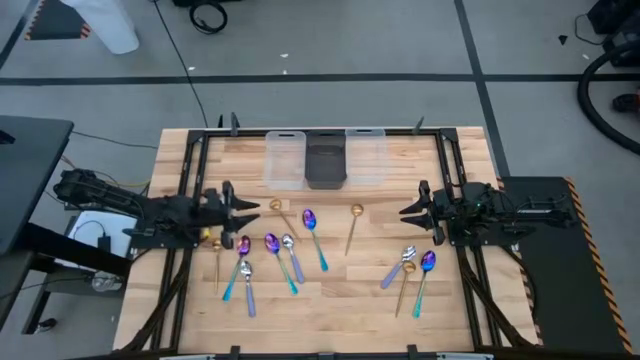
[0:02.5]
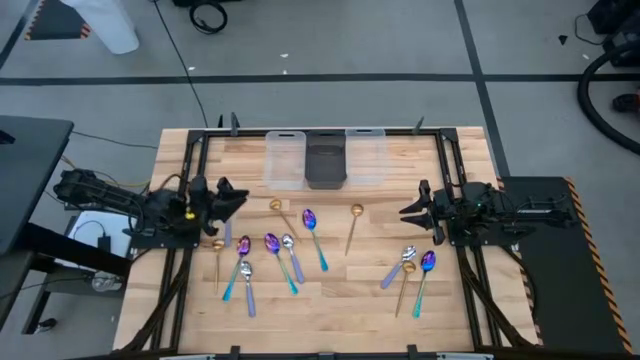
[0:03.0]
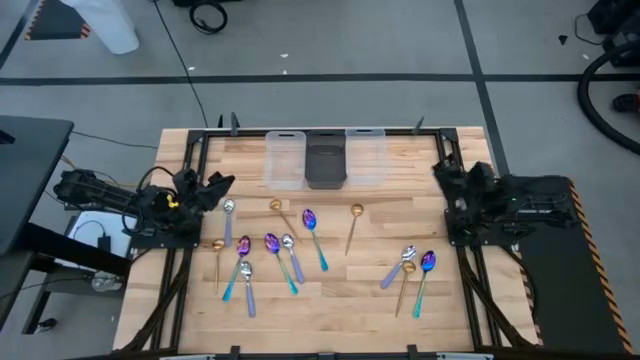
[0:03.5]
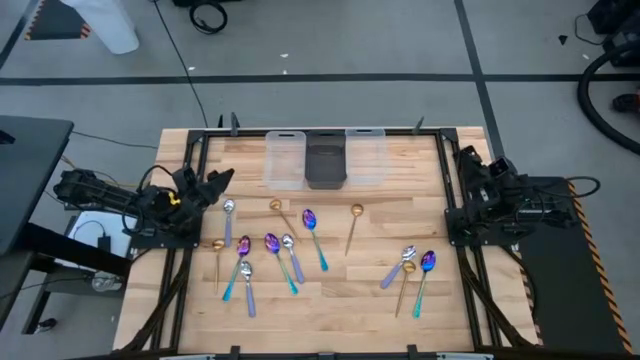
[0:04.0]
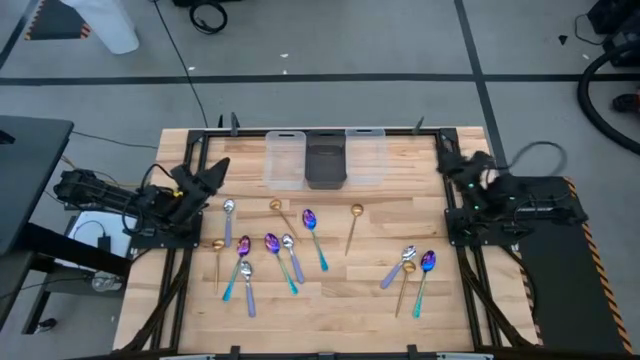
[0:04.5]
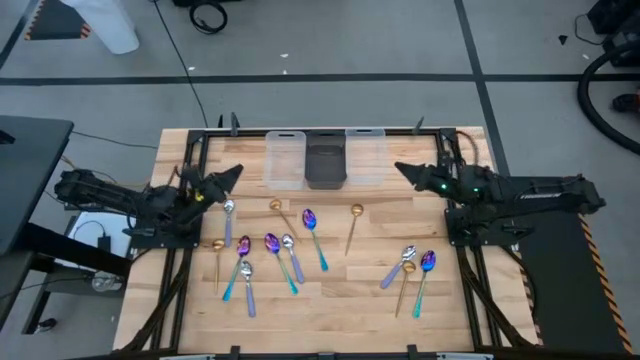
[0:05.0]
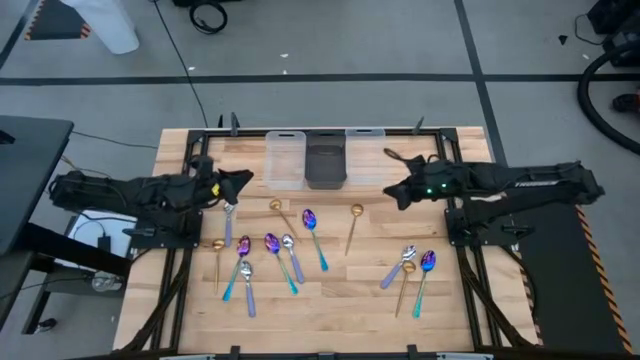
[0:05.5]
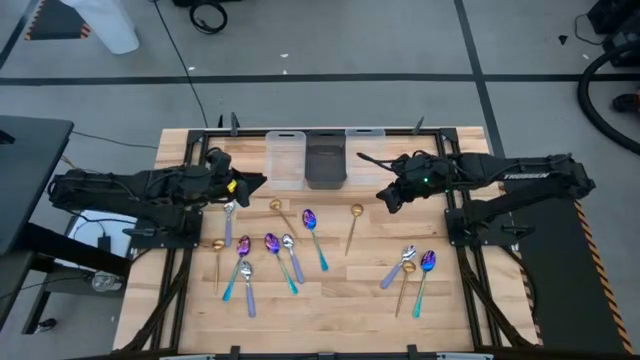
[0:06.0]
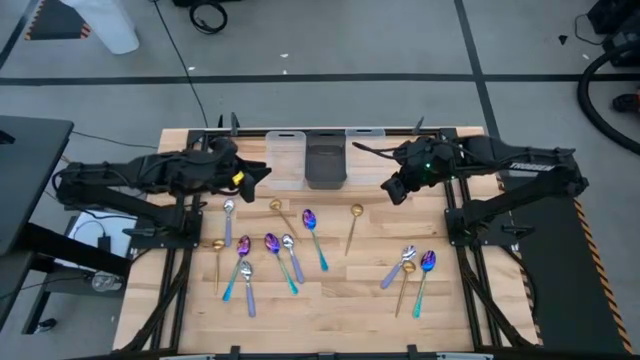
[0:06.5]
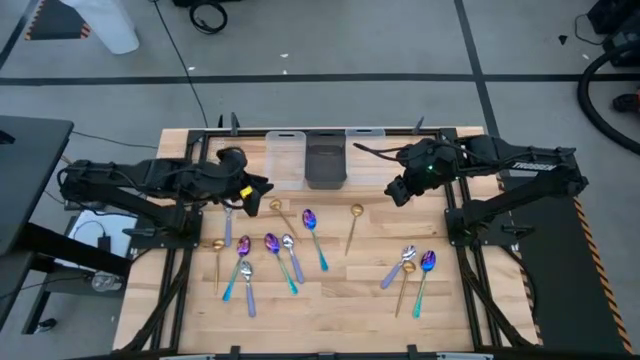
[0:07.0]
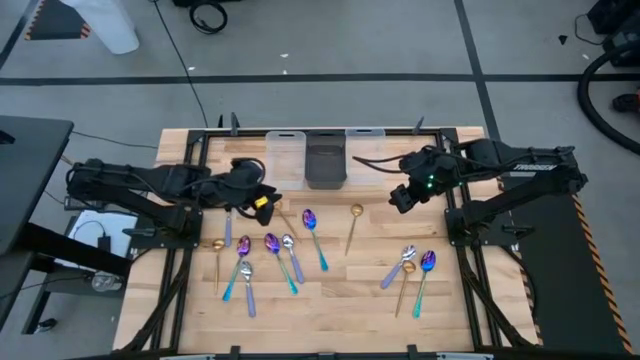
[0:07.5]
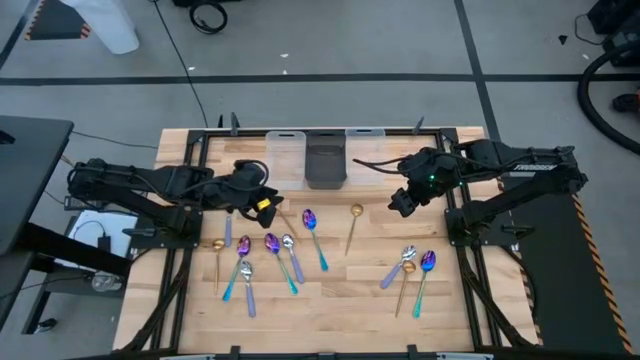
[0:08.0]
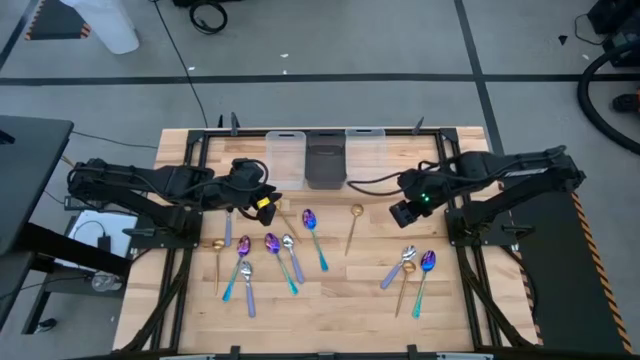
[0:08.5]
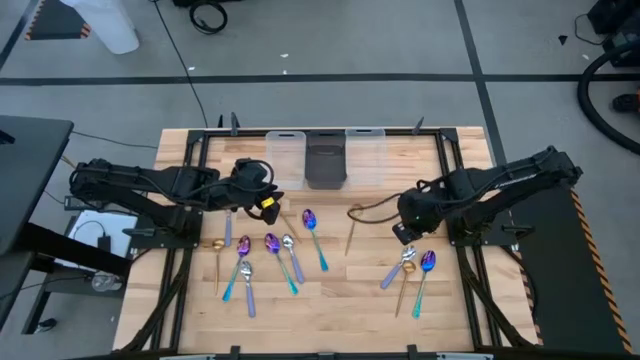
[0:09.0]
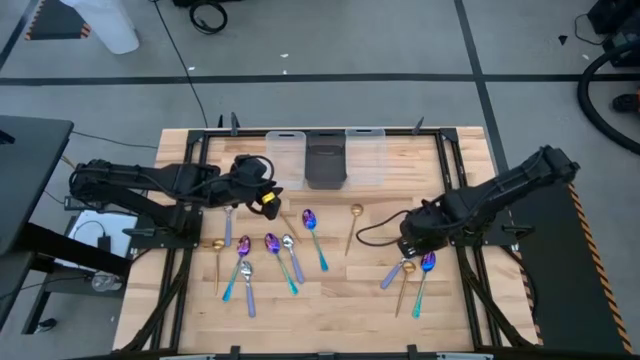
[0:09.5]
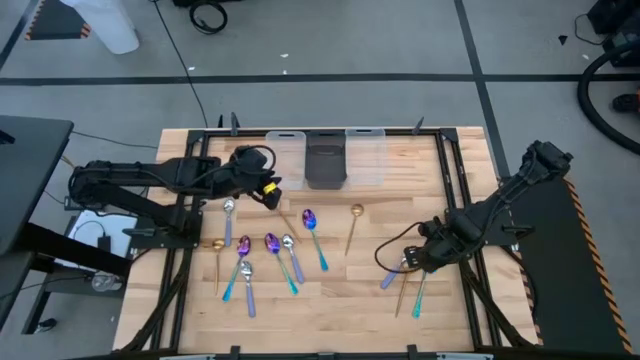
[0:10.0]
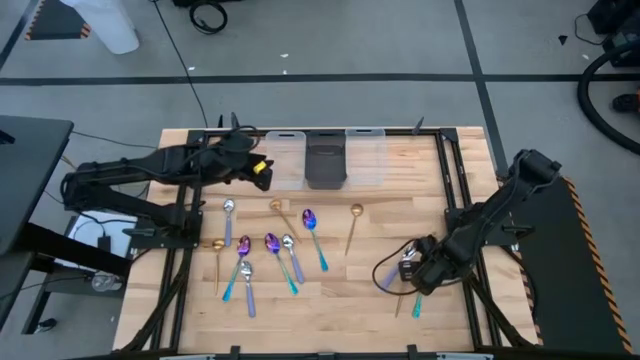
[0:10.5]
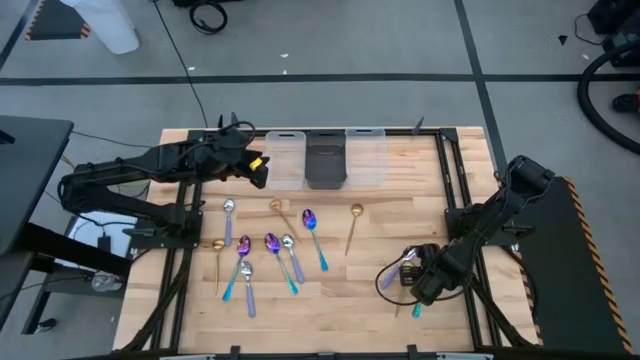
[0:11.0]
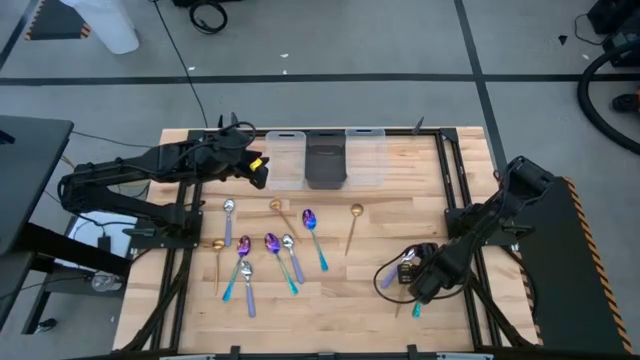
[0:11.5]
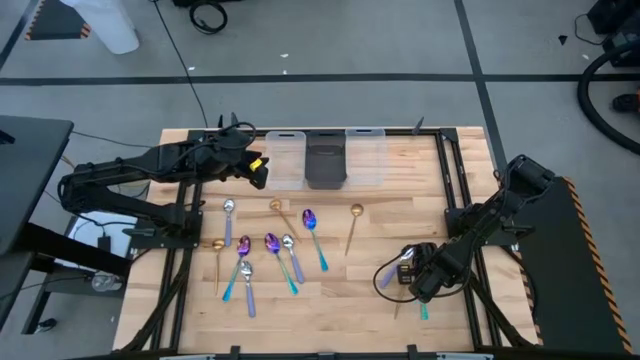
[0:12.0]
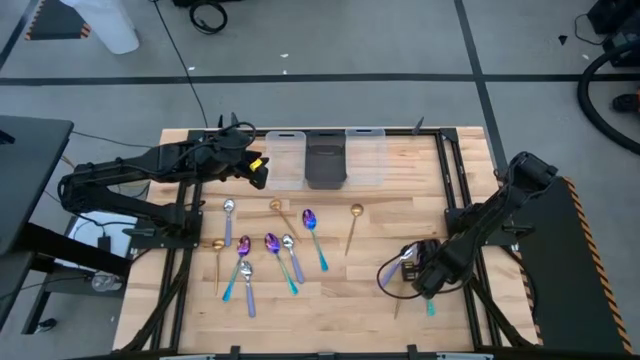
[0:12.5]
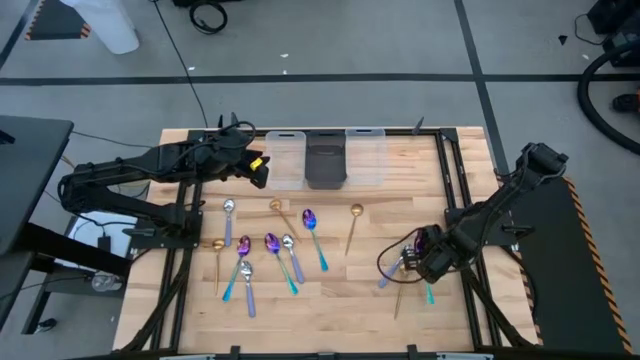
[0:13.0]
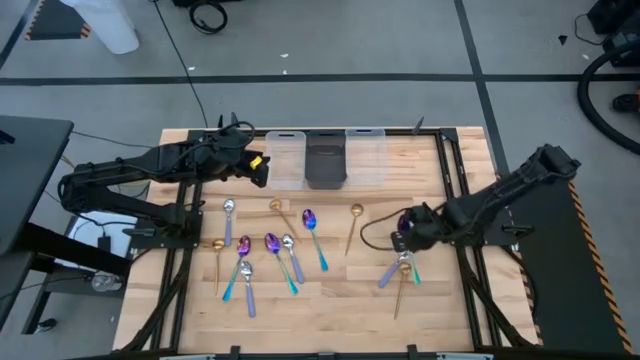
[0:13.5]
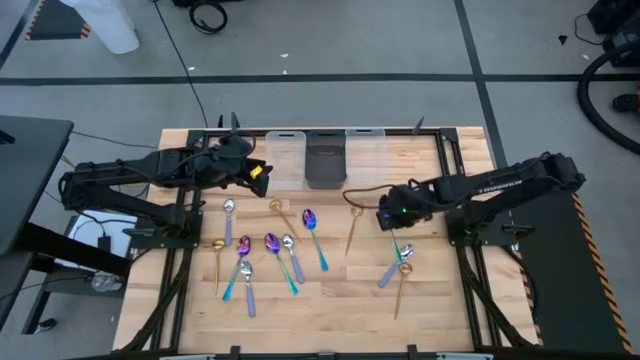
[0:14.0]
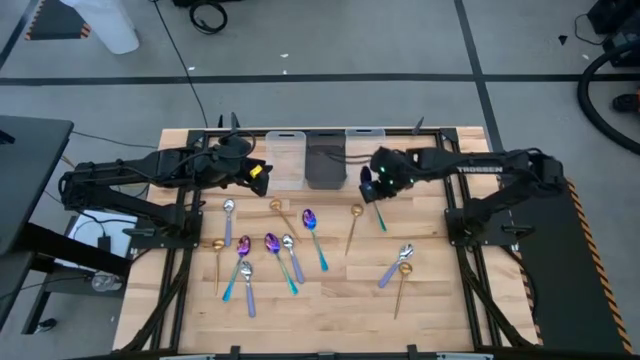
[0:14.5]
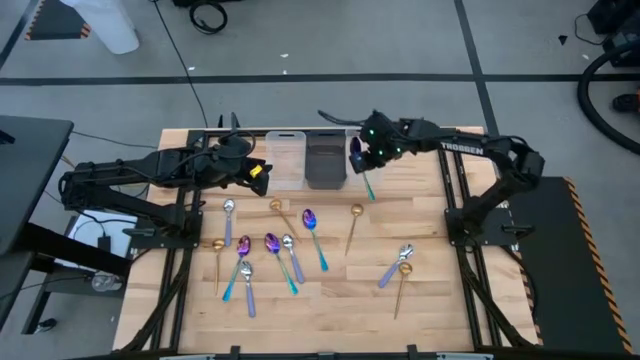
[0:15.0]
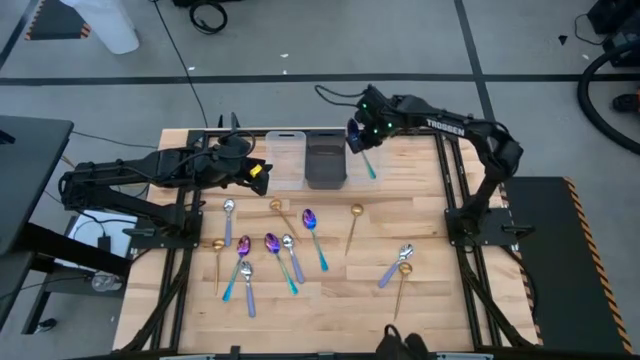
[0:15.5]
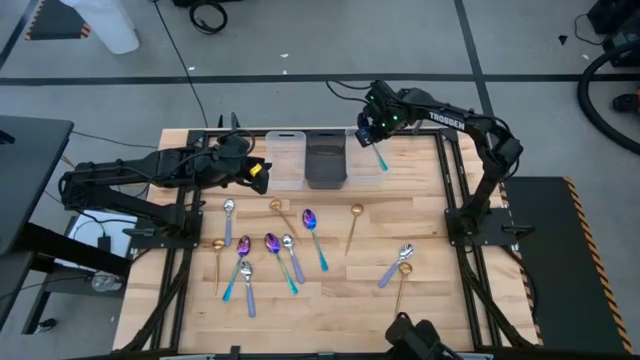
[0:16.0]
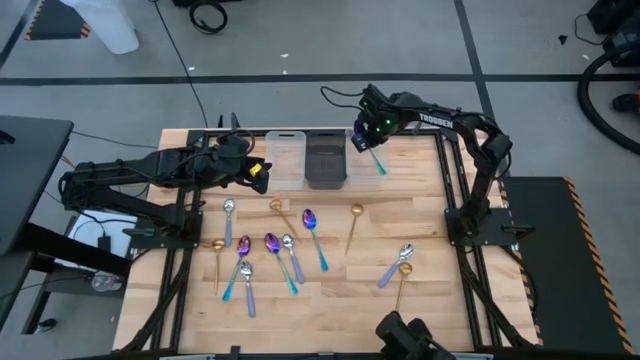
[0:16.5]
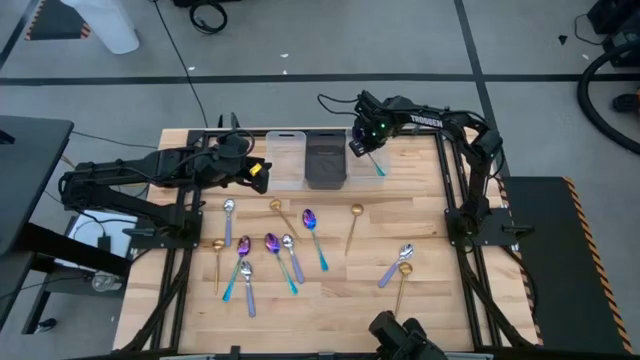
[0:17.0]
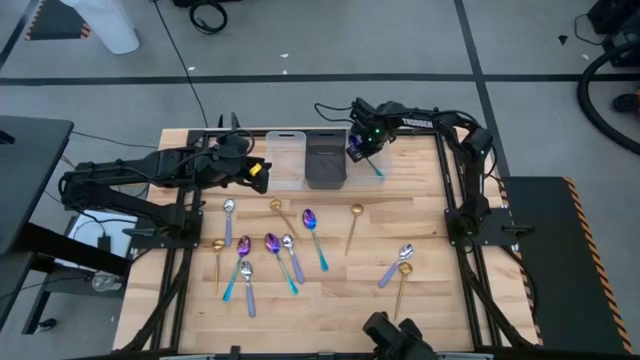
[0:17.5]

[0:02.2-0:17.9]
Task: Sort silverware by color (type)
Put the right blue spoon into the right transparent bin

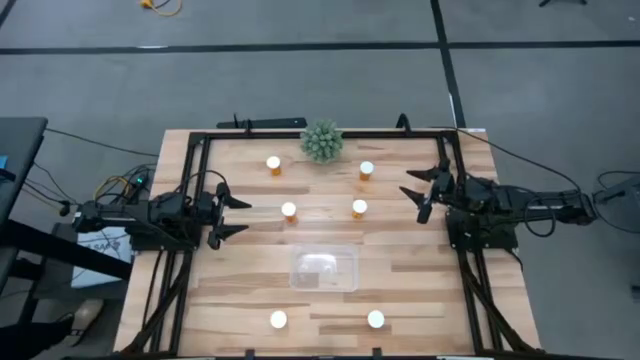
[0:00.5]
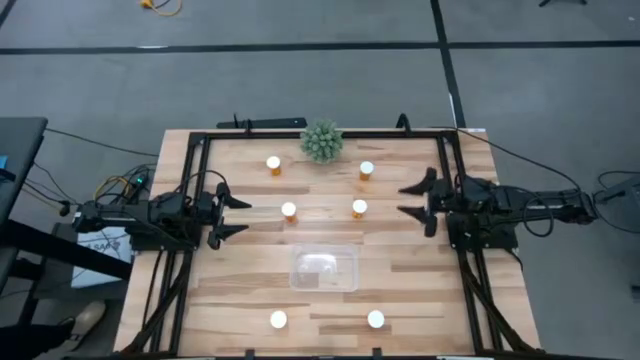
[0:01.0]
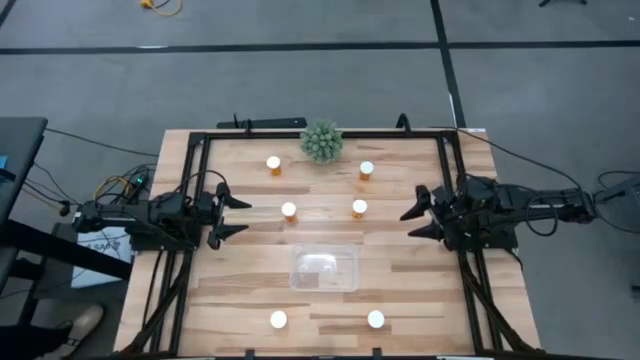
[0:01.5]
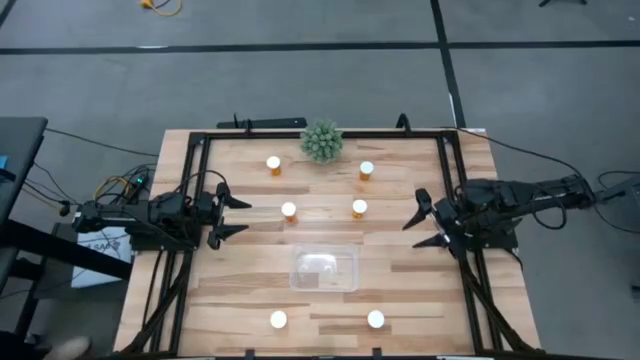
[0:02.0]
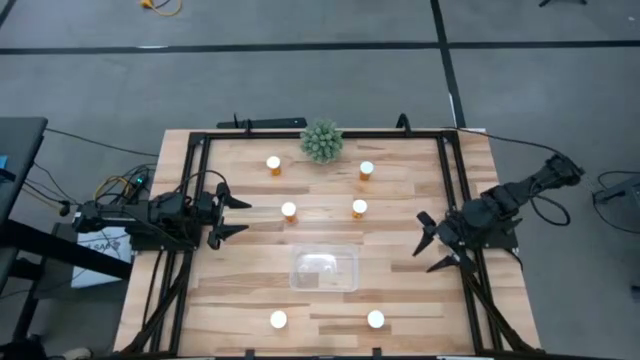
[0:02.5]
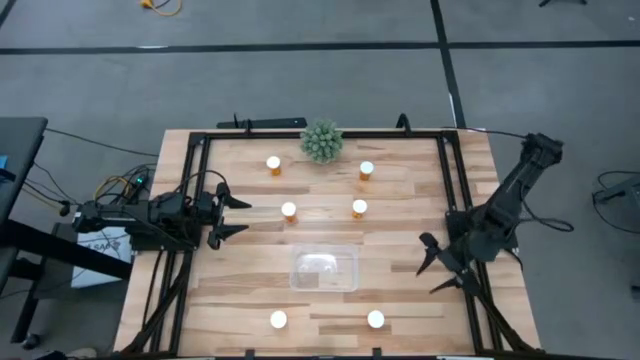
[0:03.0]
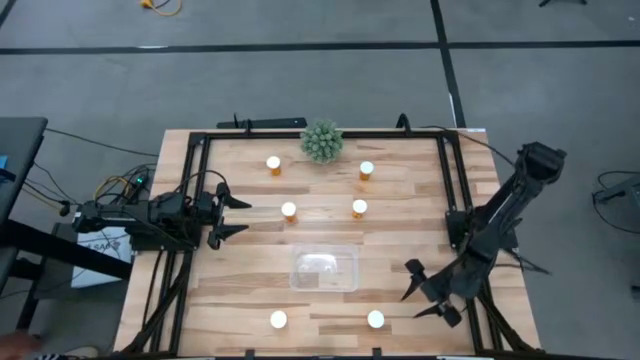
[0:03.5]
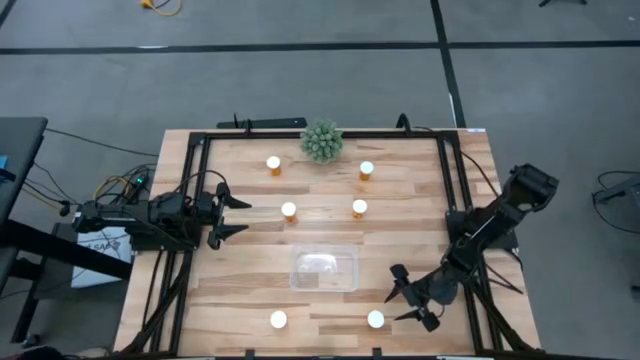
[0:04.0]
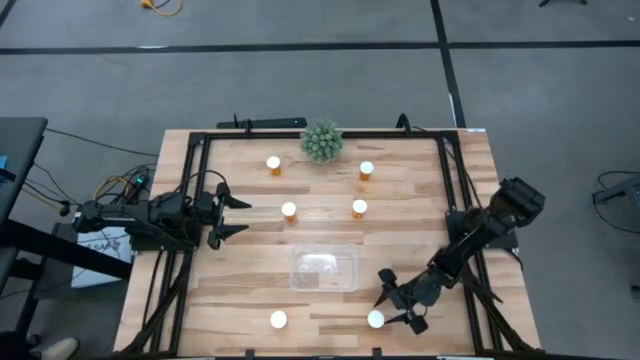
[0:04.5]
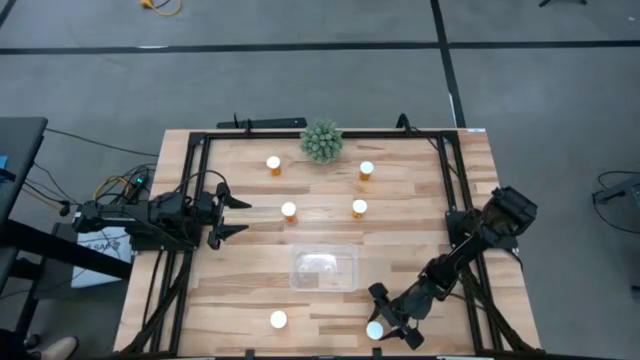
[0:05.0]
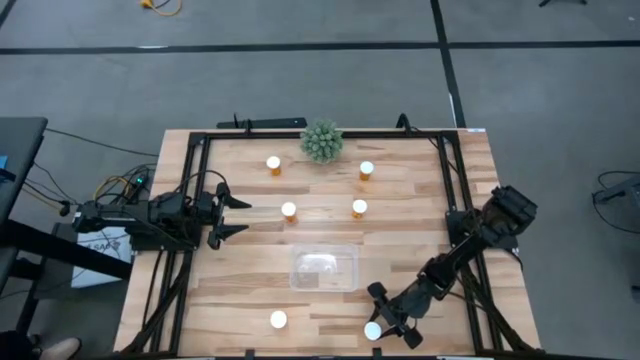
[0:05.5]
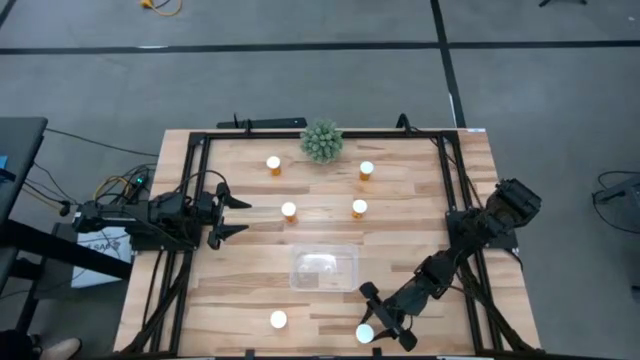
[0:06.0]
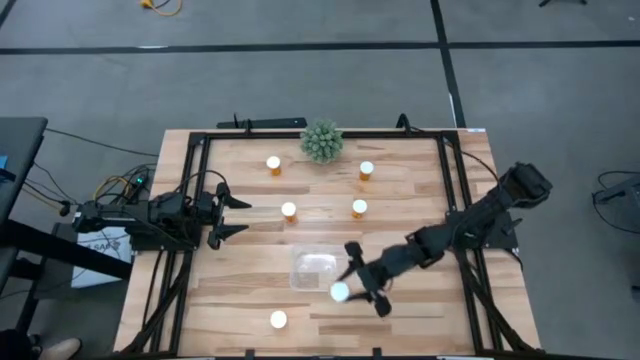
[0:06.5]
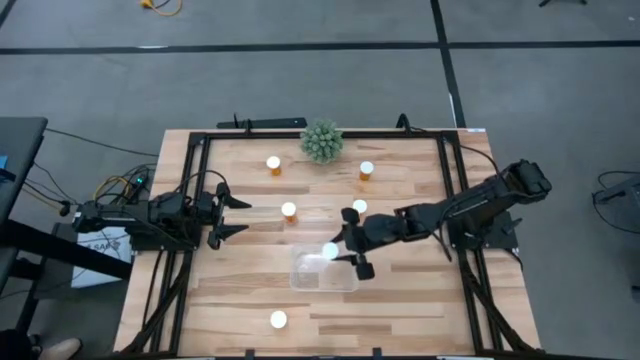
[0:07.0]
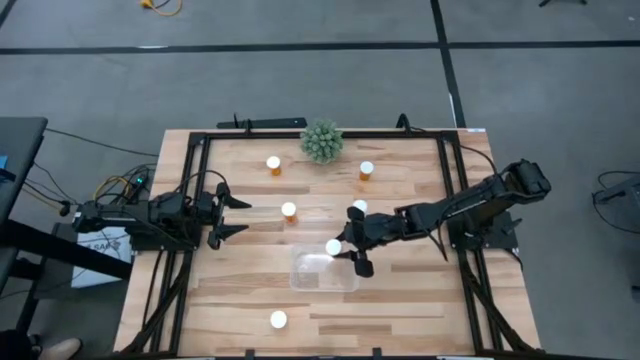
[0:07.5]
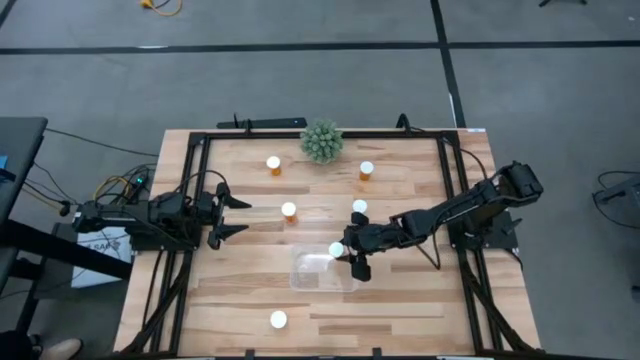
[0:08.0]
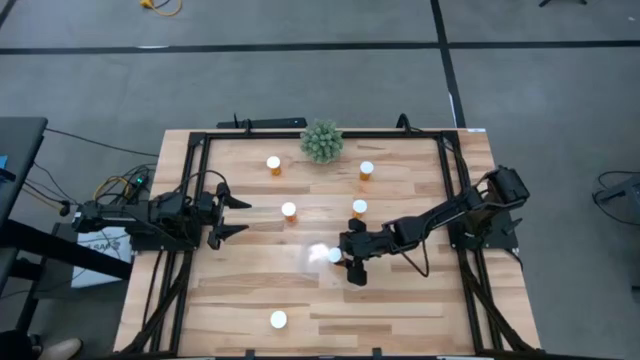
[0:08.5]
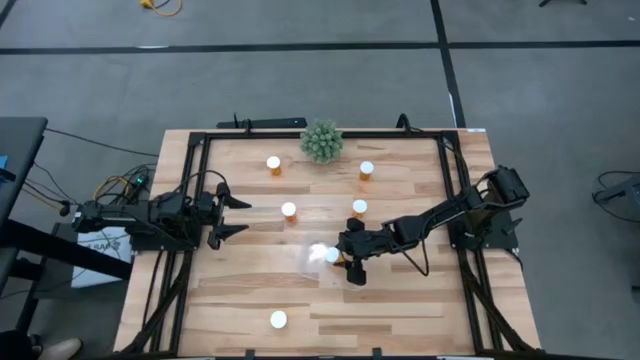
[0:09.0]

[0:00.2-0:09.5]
Task: Pick and place pill bottles into a basket
Put the orange pill bottle into the transparent bin
